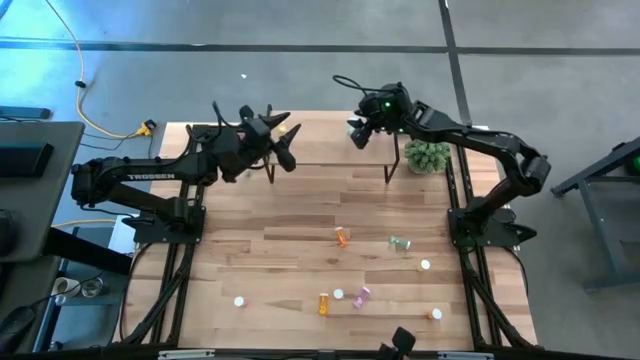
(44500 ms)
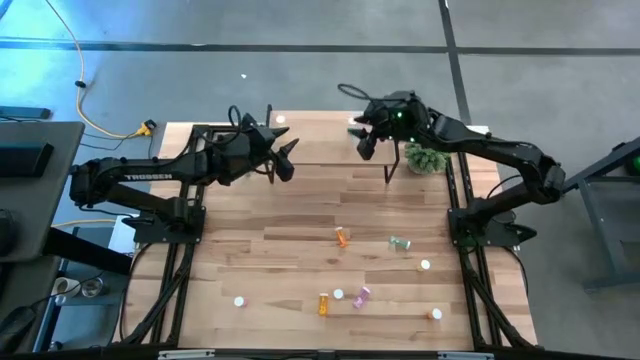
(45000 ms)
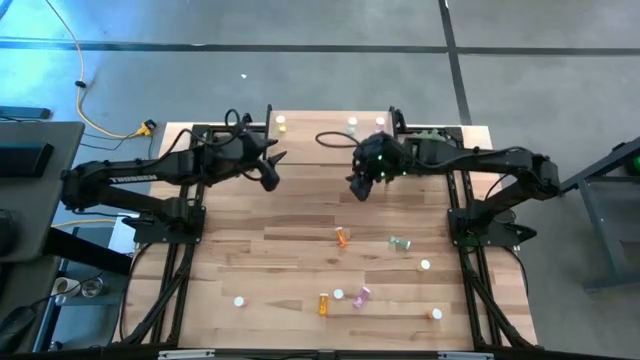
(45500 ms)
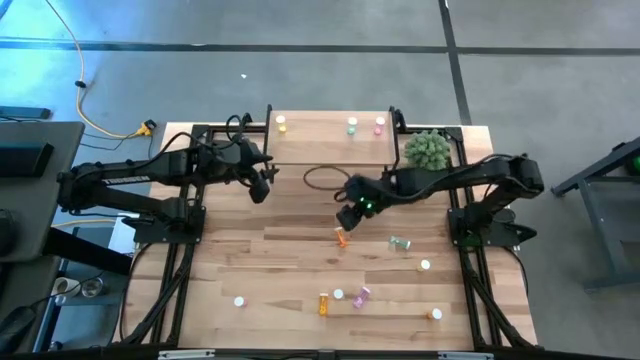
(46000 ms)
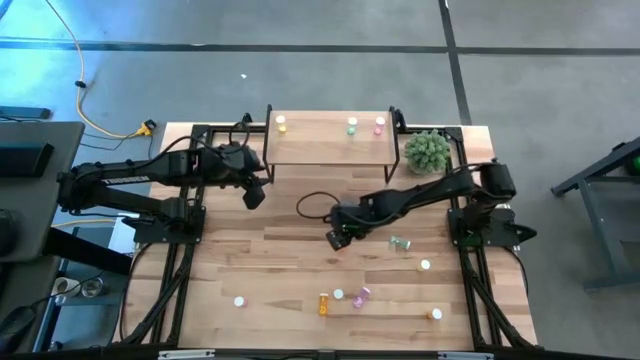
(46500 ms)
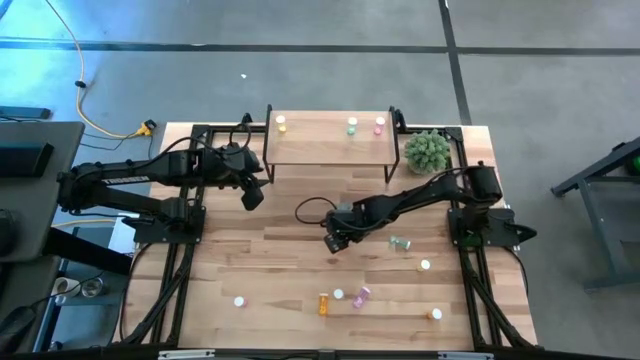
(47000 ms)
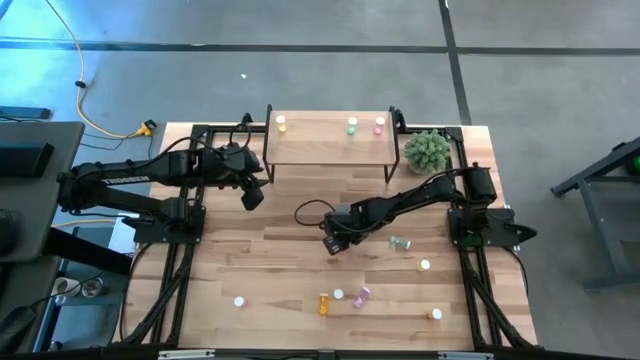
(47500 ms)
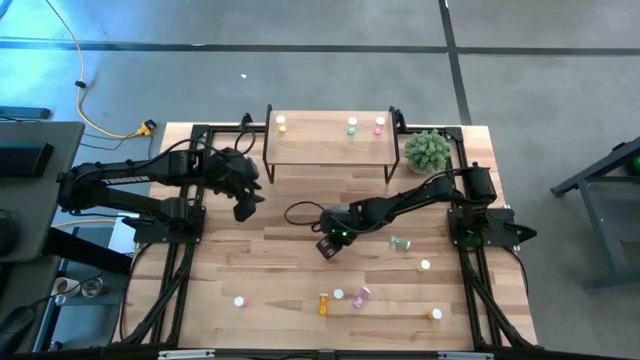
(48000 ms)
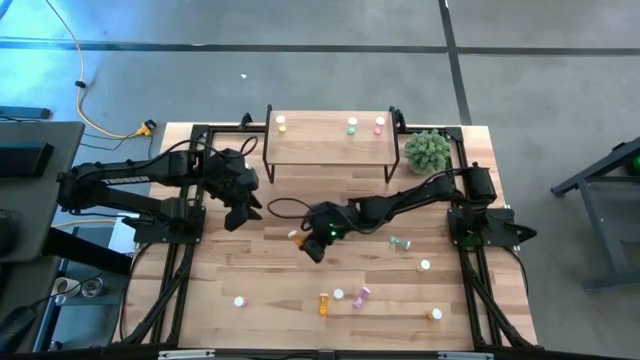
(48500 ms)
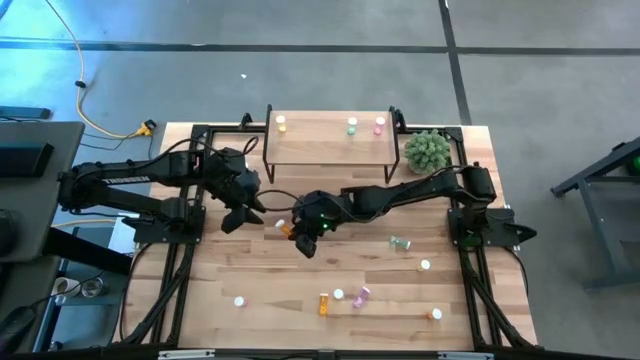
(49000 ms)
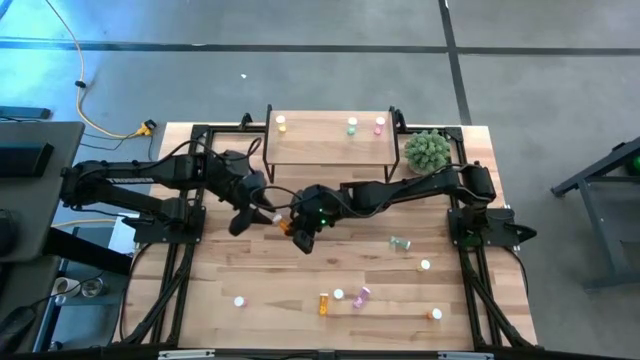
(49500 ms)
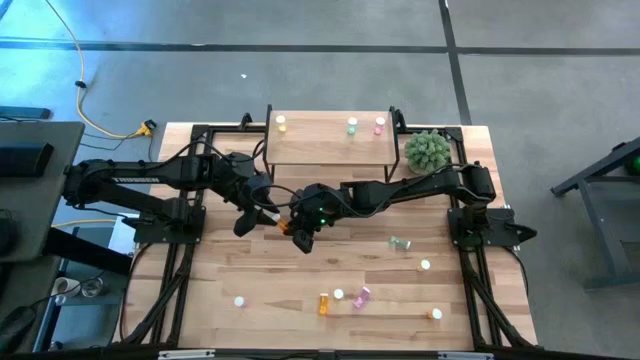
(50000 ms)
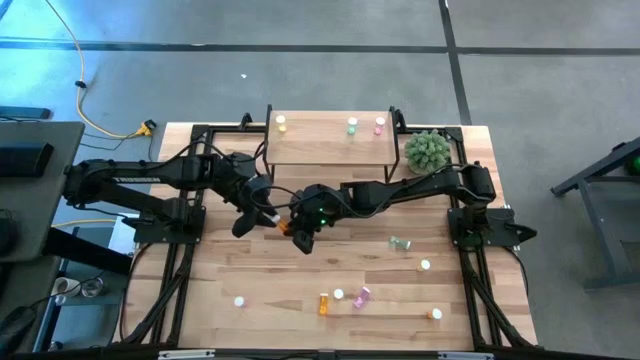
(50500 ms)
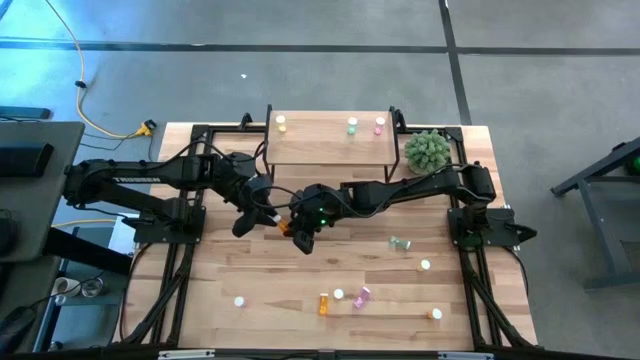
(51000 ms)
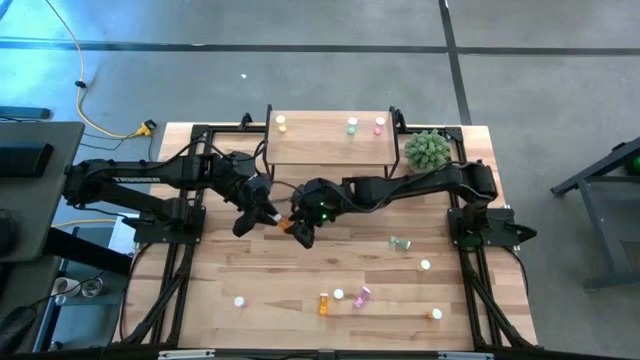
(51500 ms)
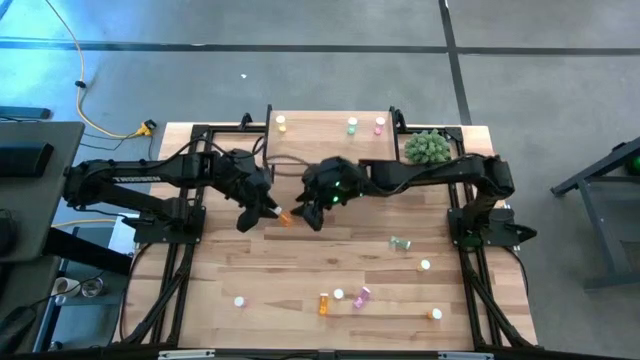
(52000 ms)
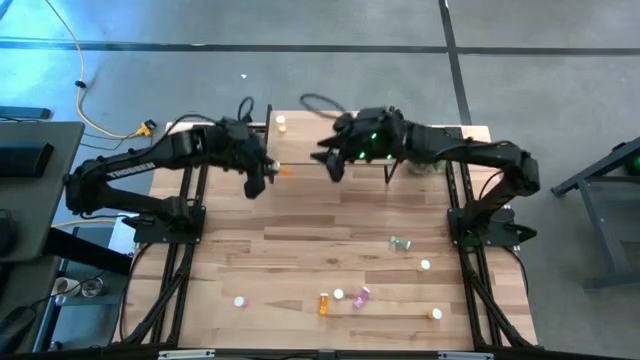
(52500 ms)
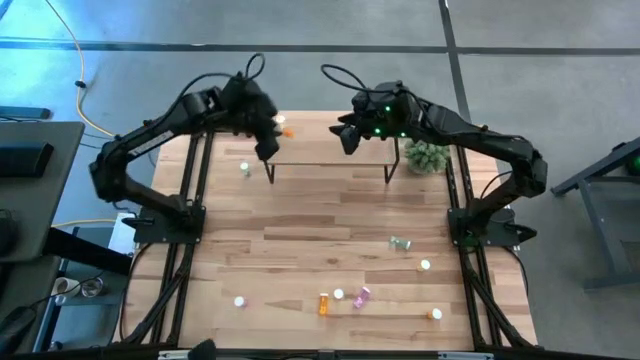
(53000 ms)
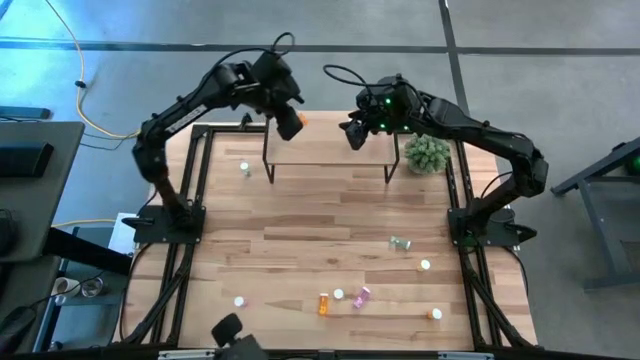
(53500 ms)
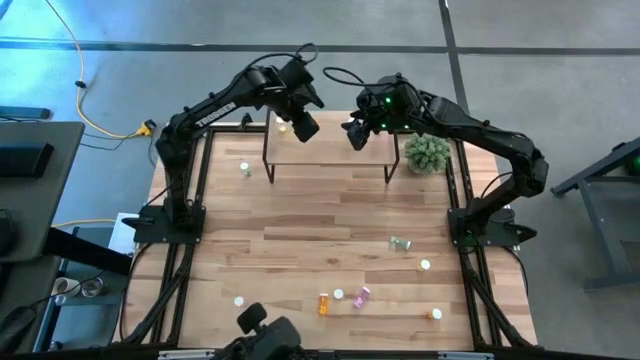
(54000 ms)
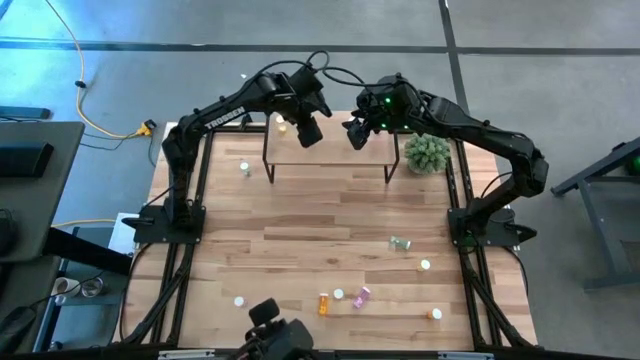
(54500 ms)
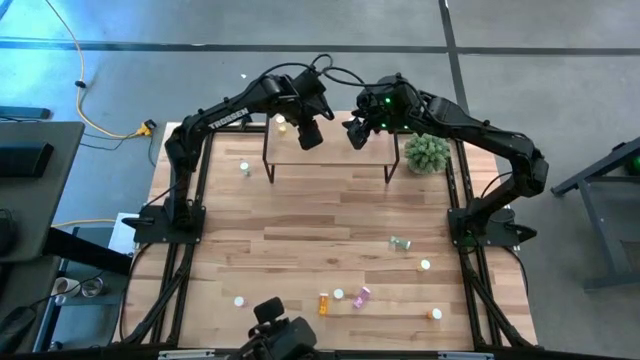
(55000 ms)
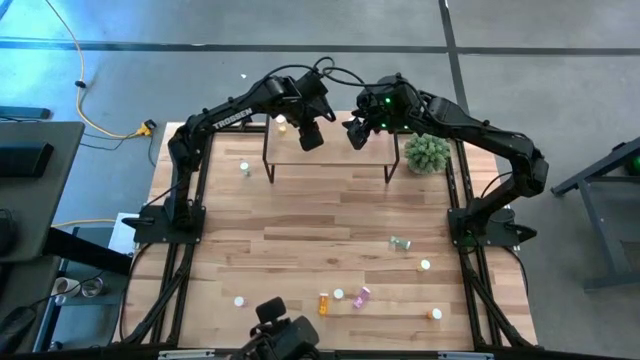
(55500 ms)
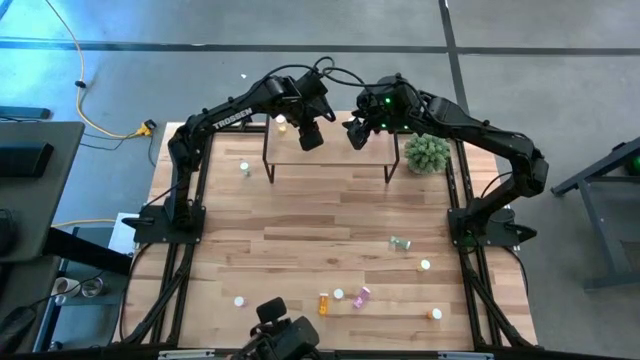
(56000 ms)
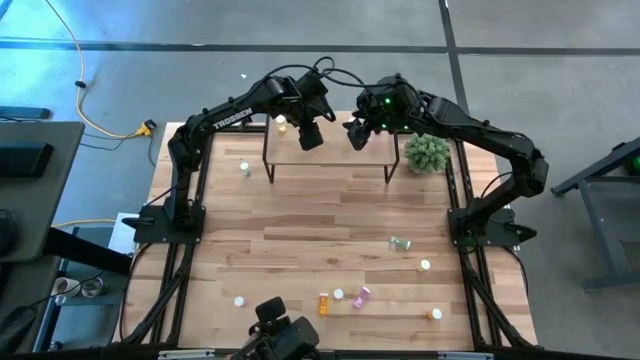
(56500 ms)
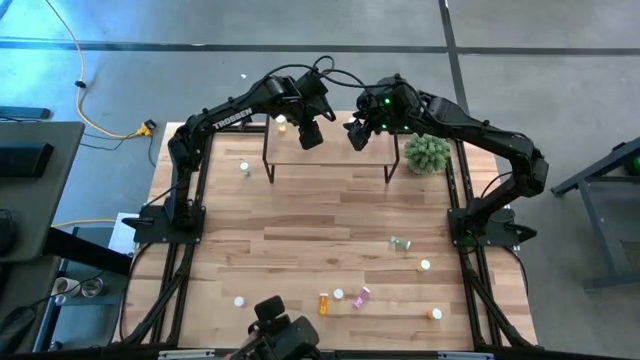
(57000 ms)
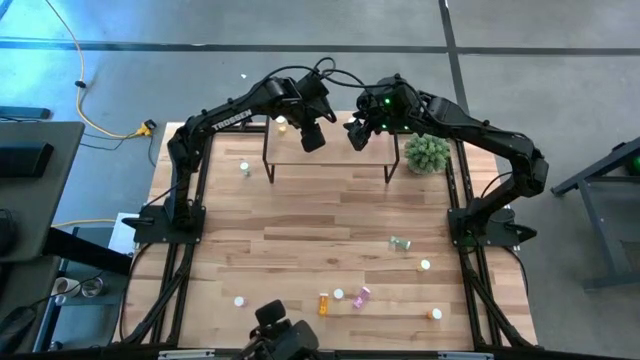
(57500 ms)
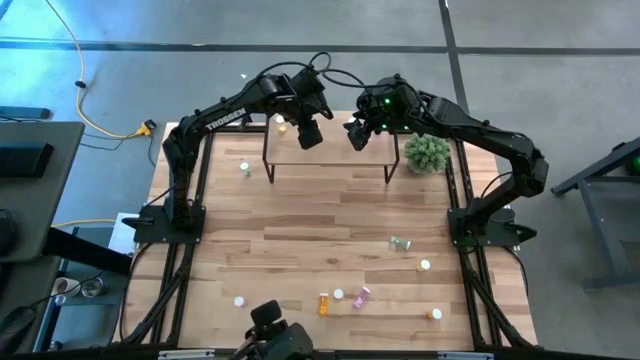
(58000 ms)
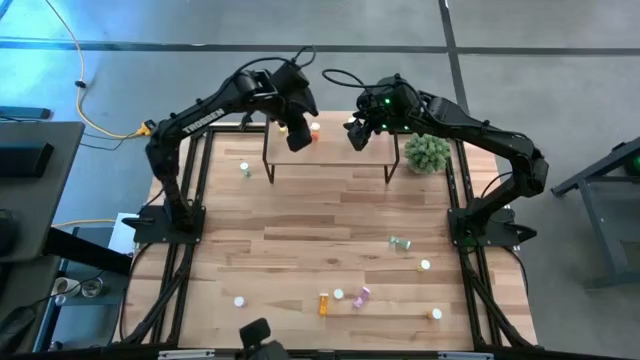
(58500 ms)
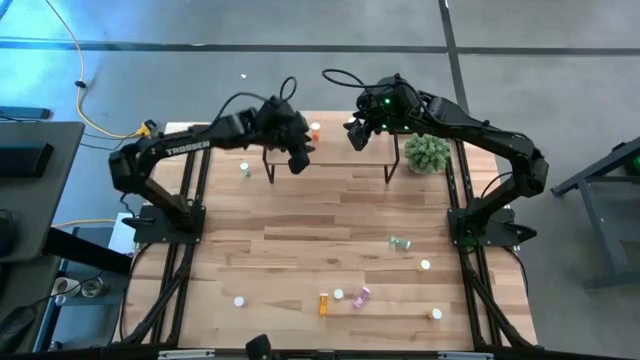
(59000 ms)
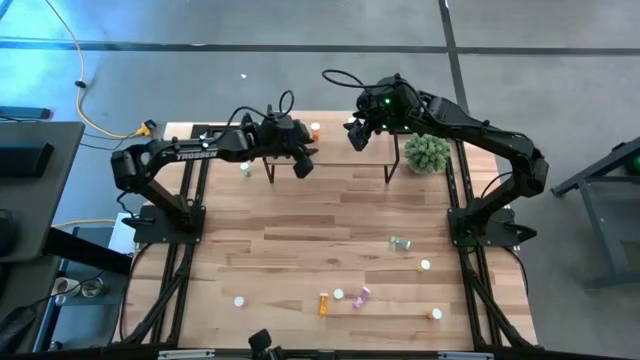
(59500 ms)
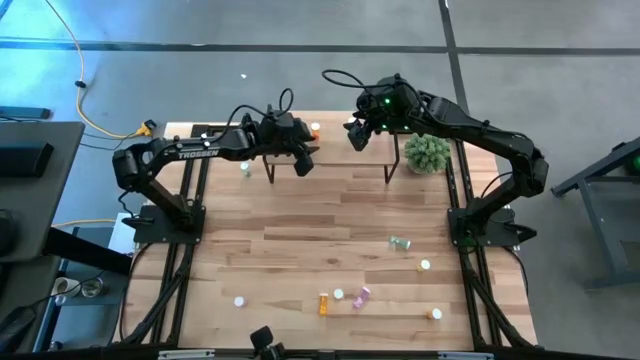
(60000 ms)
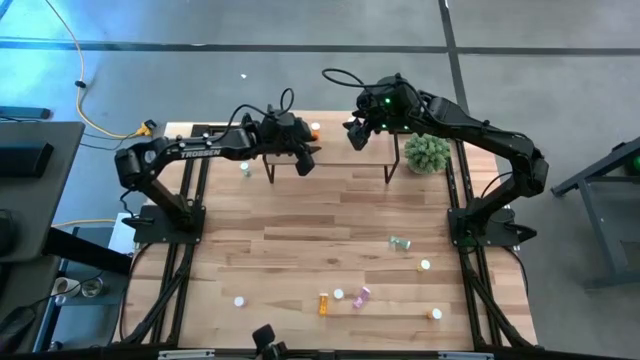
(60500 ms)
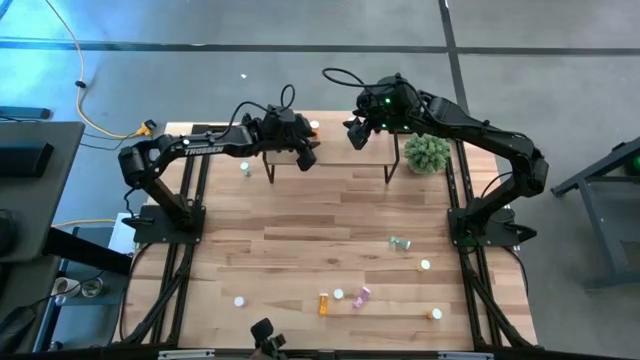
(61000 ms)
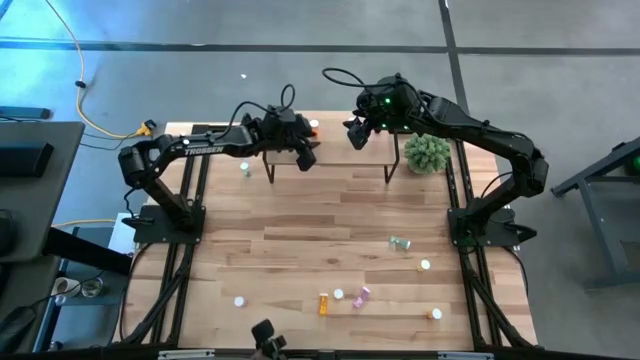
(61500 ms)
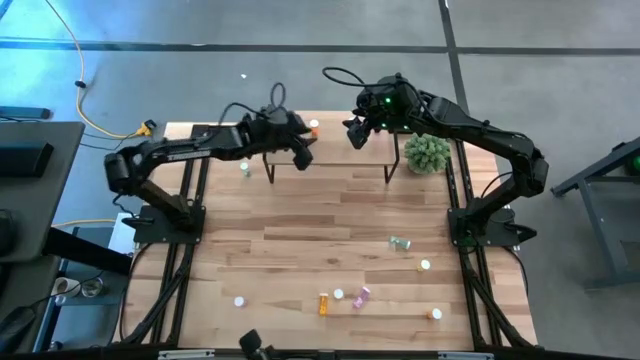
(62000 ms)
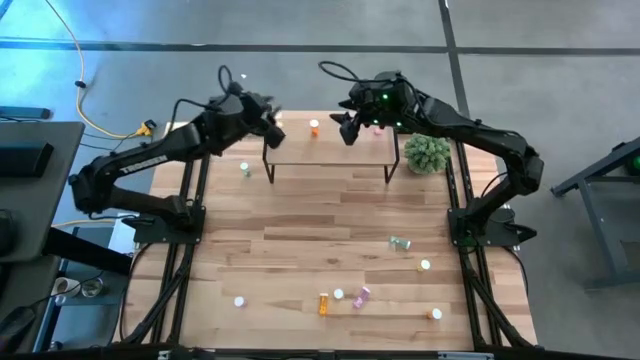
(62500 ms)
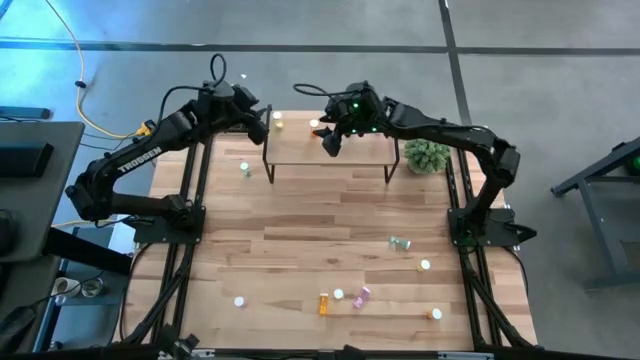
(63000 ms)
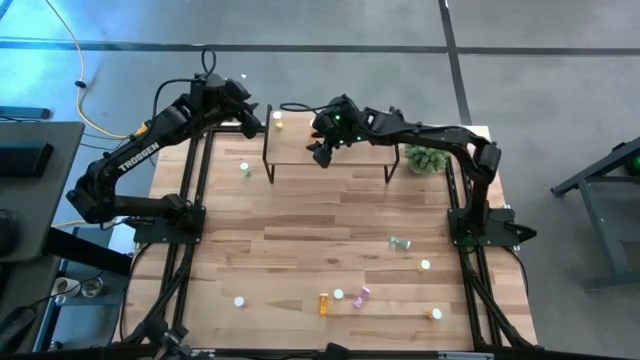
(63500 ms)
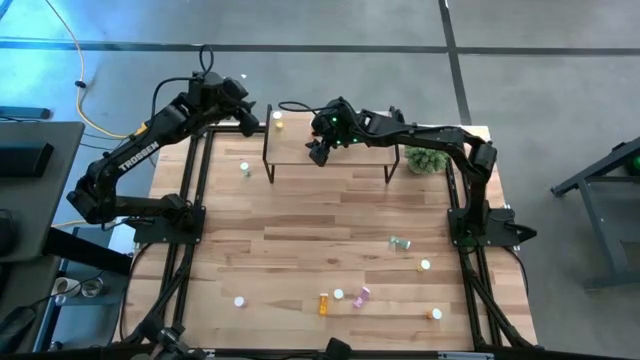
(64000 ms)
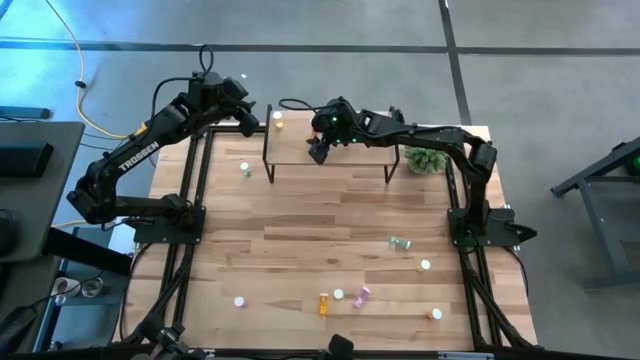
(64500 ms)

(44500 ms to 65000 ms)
Task: Pick and place medicine bottles onto shelf by color
Put the top orange pill bottle on the shelf

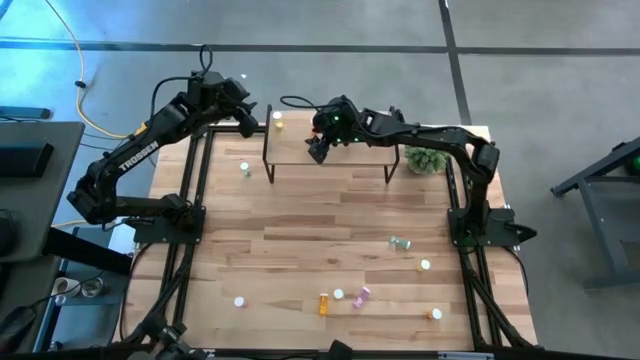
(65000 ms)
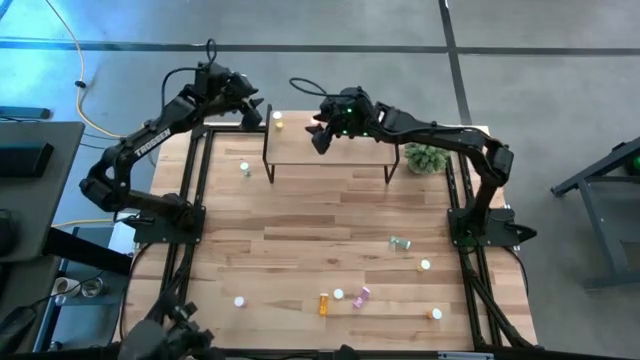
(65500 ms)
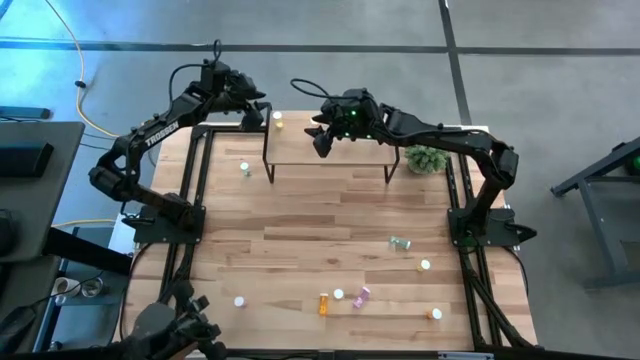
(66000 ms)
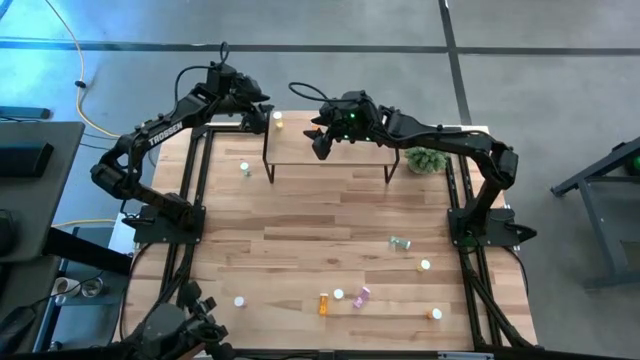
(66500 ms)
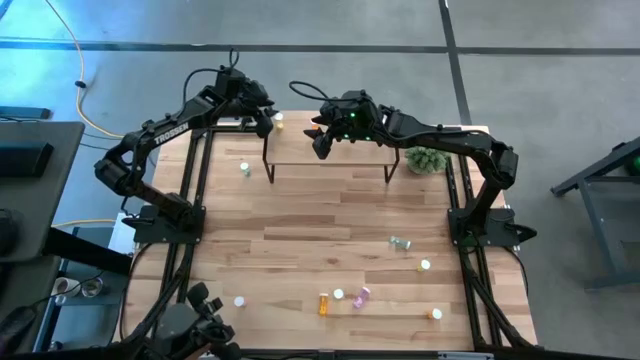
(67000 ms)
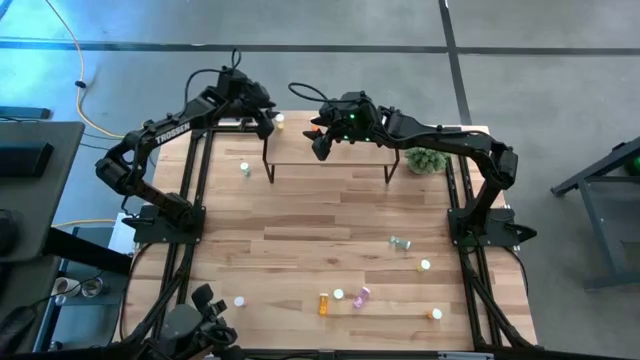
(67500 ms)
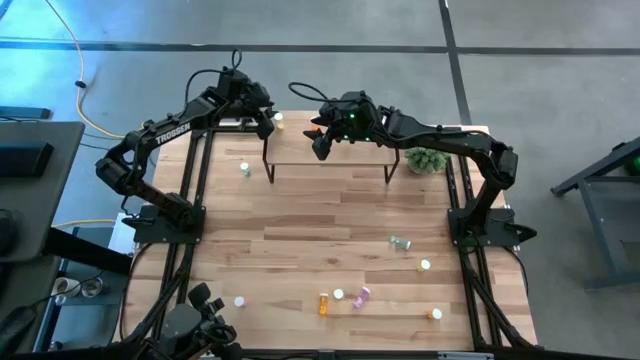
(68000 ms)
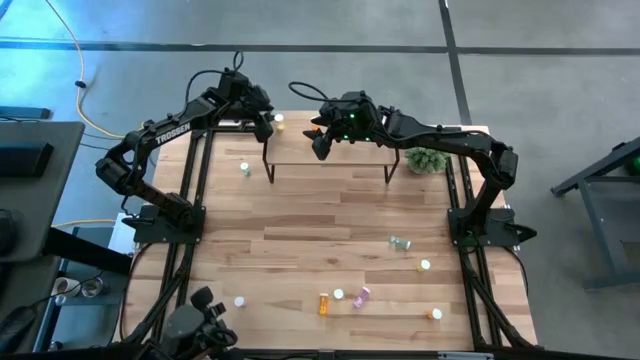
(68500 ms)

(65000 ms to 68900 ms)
Adjust the yellow pill bottle
